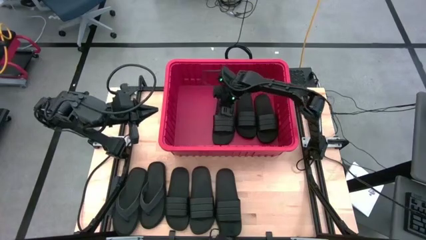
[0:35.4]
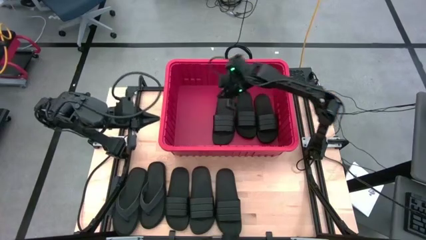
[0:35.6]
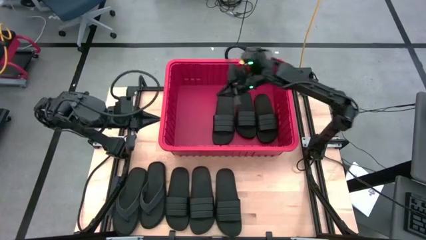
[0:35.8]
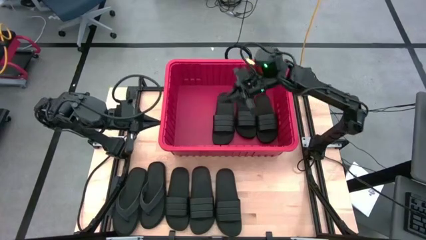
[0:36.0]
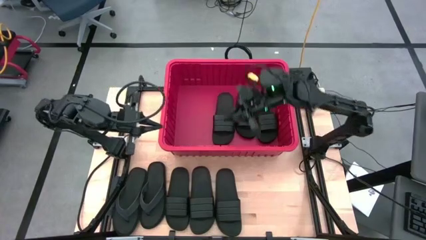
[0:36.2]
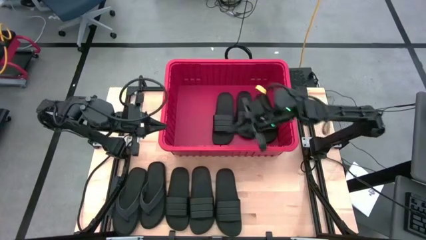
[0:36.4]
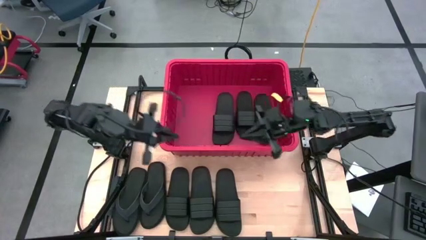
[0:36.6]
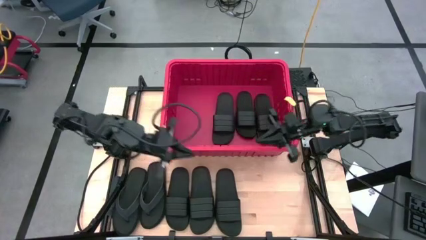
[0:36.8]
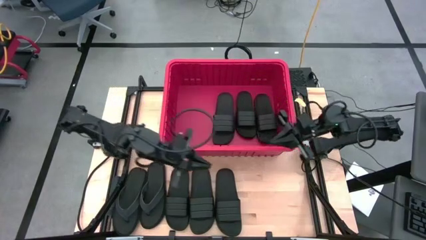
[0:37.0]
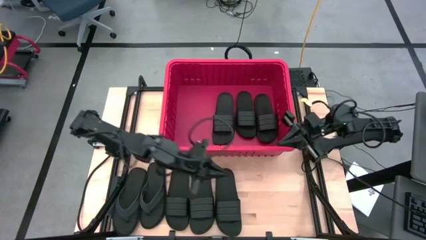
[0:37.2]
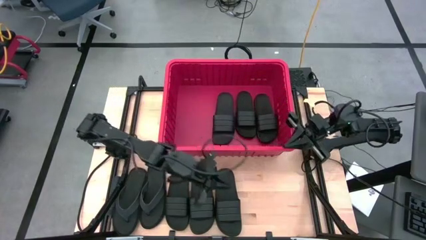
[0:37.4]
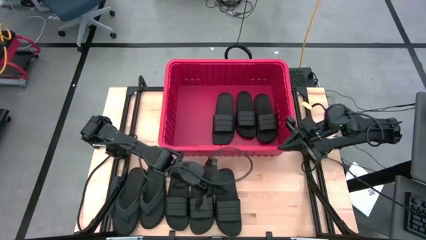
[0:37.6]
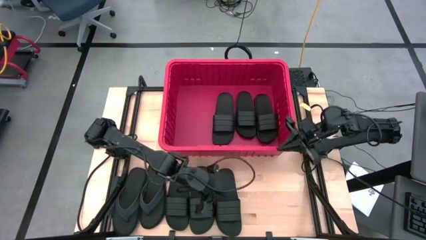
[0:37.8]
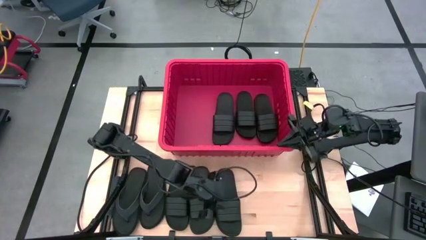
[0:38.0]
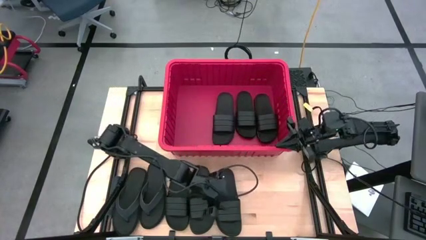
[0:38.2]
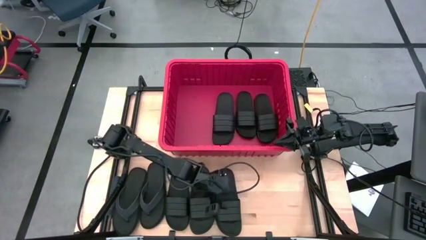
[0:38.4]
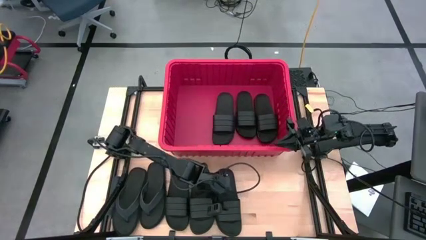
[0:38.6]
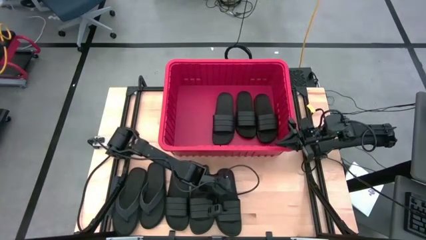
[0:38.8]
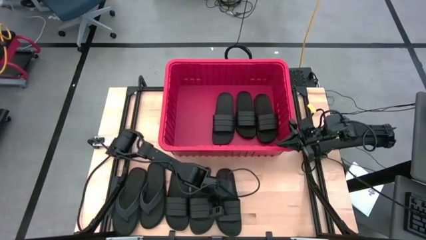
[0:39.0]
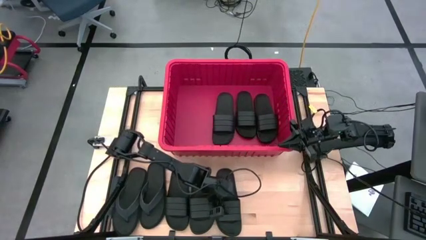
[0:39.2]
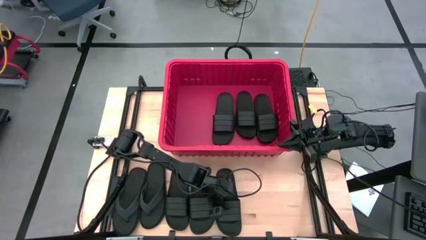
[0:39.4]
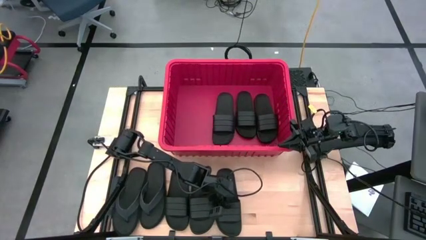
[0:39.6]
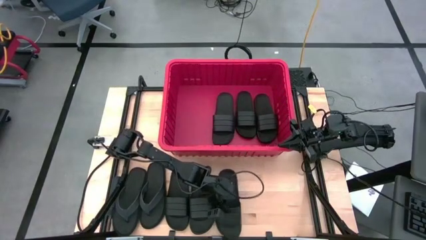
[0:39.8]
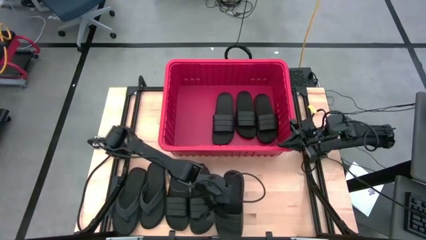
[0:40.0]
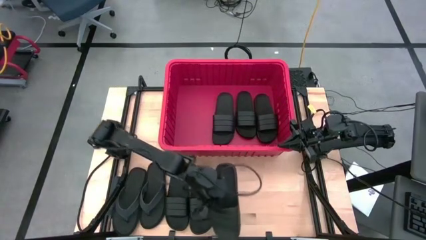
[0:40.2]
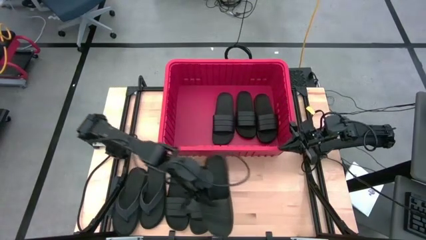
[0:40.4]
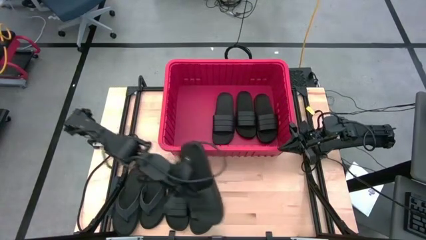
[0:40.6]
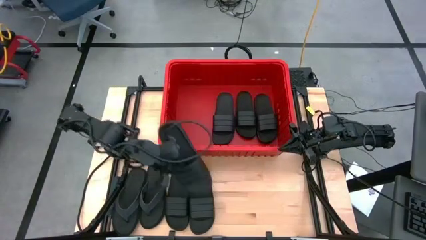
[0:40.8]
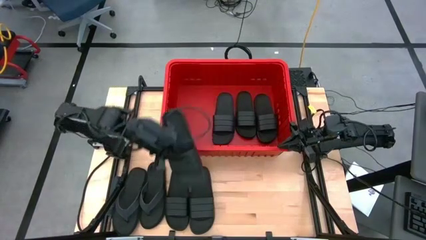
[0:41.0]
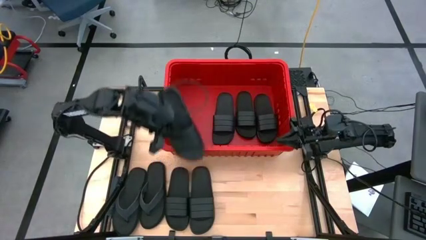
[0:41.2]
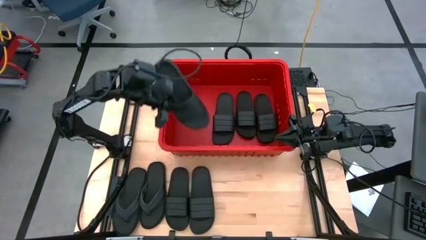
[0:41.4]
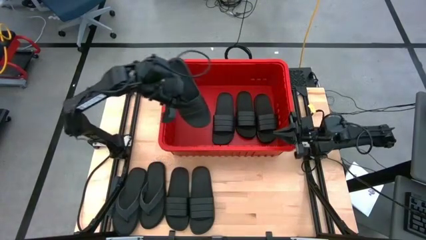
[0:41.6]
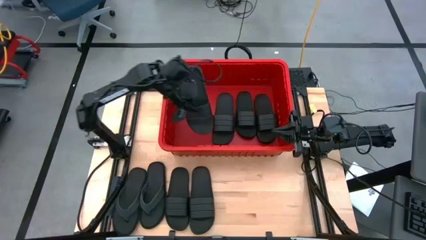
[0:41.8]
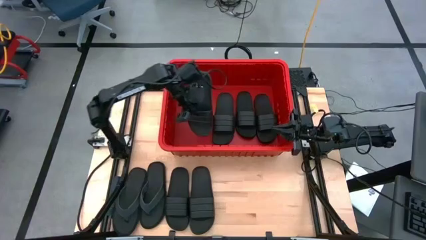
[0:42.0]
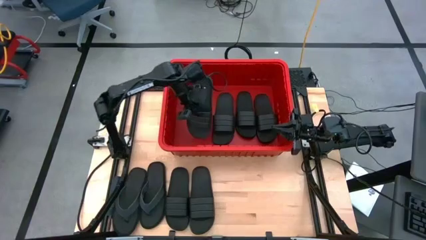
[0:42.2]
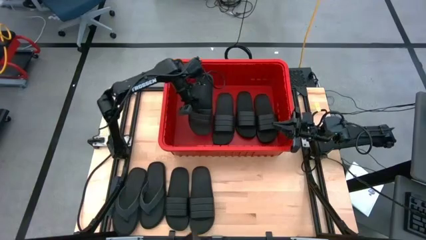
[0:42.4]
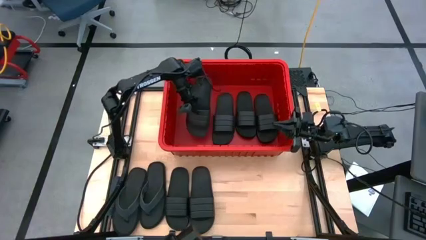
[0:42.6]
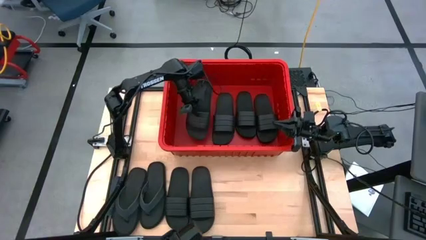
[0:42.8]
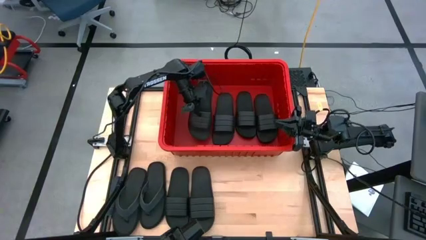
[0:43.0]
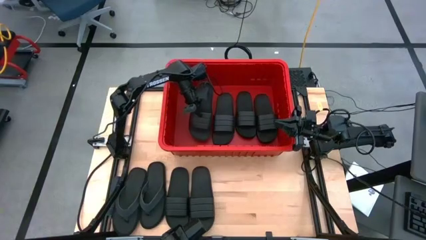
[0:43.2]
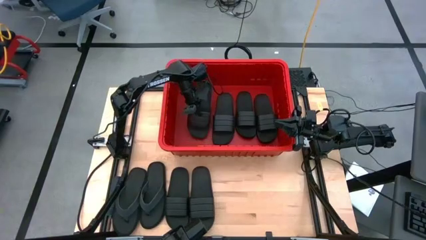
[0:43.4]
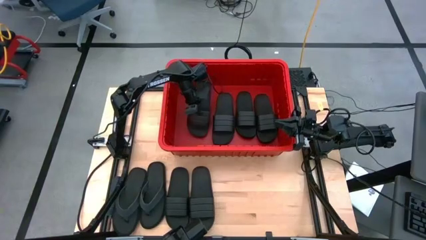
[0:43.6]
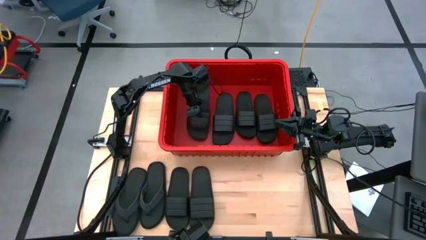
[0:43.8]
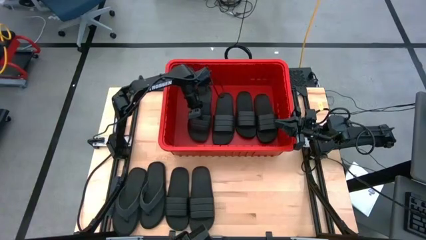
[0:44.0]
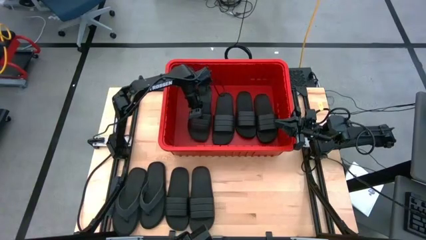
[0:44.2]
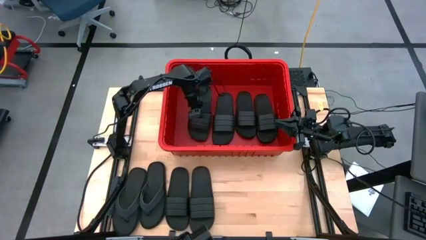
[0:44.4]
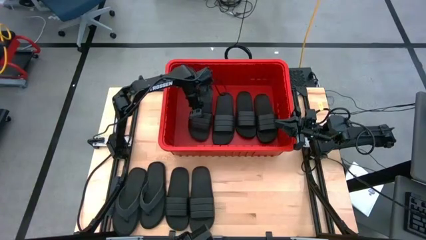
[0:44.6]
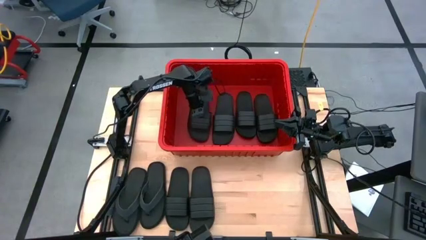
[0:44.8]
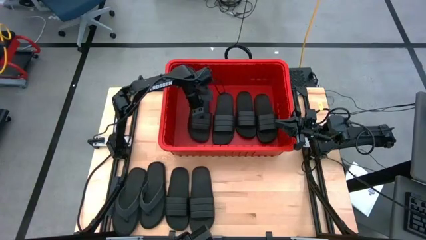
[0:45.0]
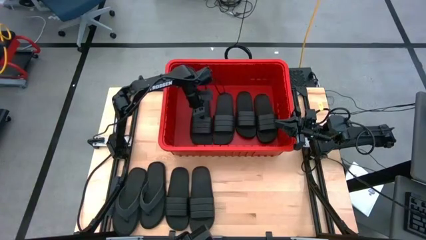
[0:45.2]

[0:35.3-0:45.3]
Task: Pick and place slides into bin
Put the black slide into the red container

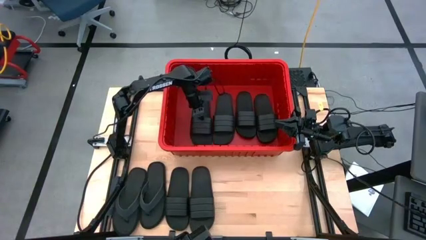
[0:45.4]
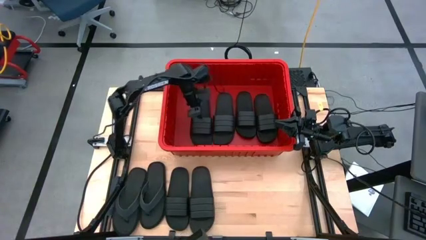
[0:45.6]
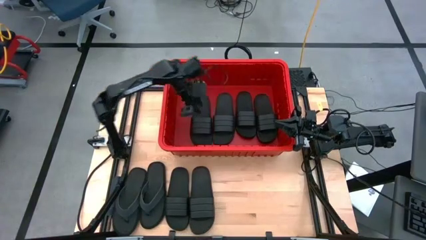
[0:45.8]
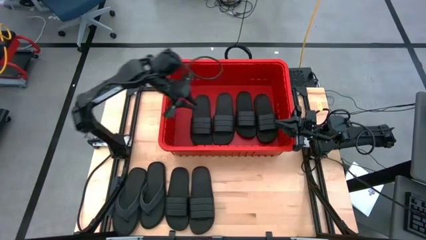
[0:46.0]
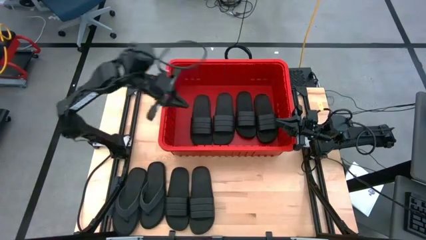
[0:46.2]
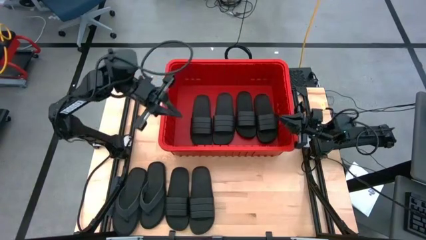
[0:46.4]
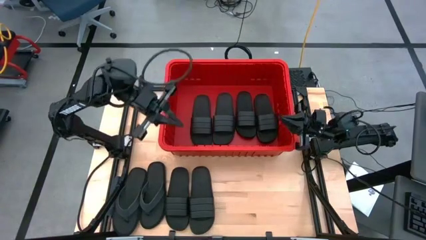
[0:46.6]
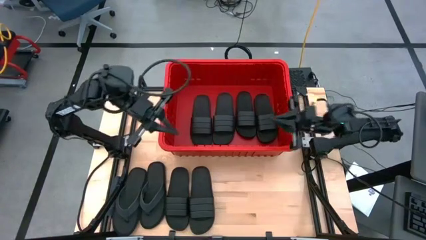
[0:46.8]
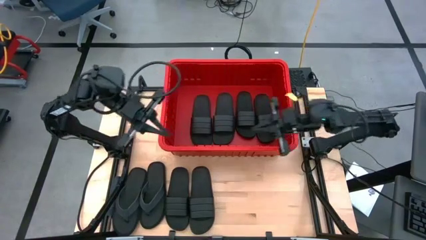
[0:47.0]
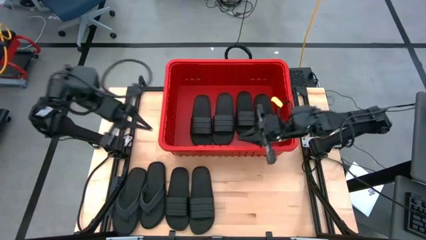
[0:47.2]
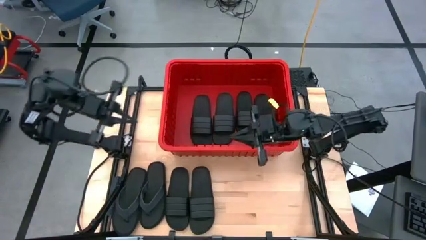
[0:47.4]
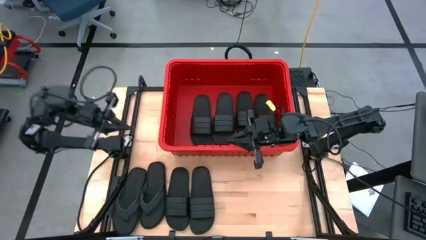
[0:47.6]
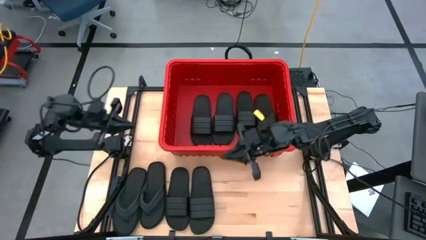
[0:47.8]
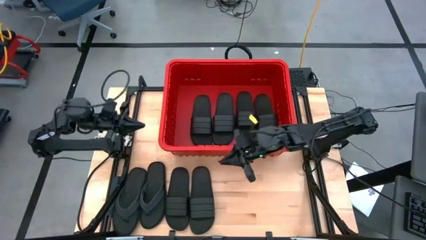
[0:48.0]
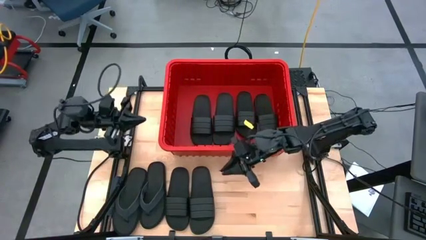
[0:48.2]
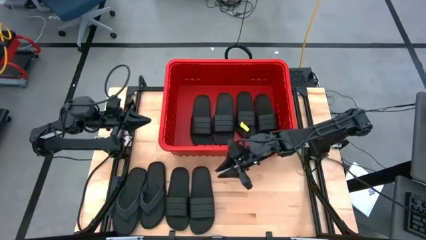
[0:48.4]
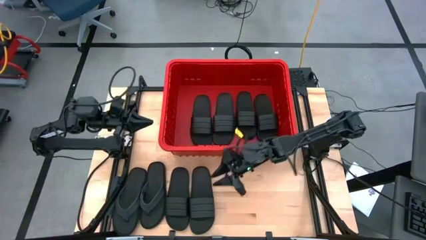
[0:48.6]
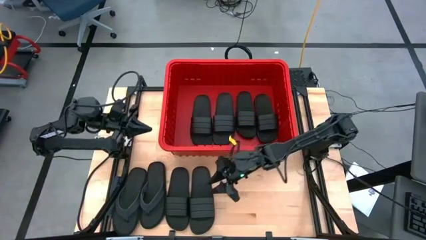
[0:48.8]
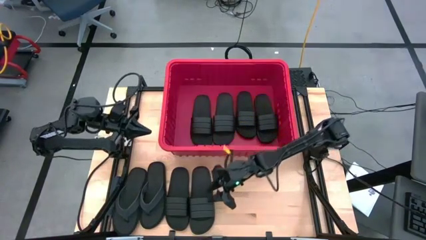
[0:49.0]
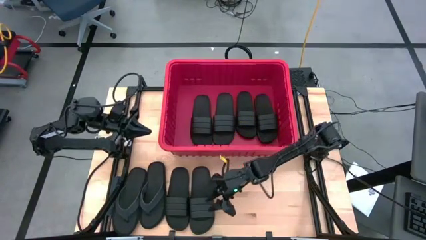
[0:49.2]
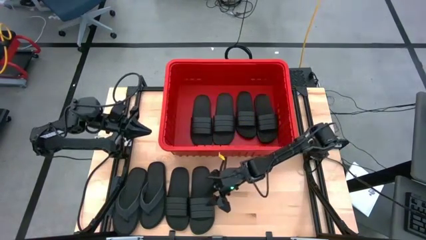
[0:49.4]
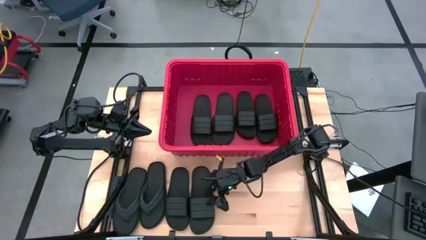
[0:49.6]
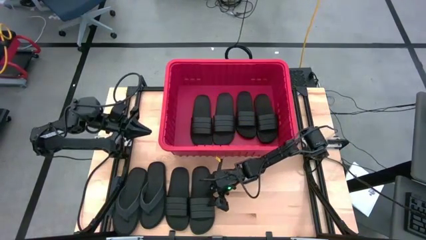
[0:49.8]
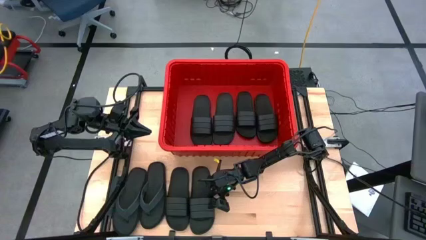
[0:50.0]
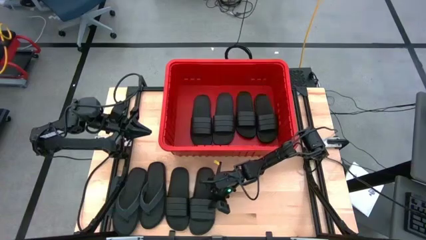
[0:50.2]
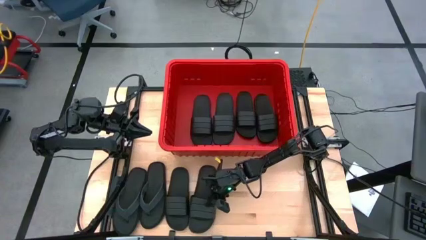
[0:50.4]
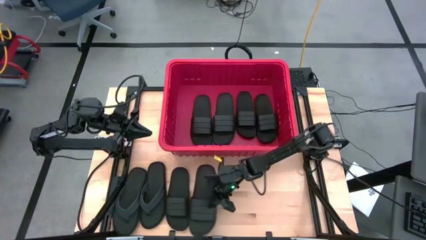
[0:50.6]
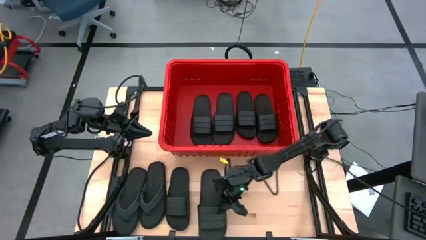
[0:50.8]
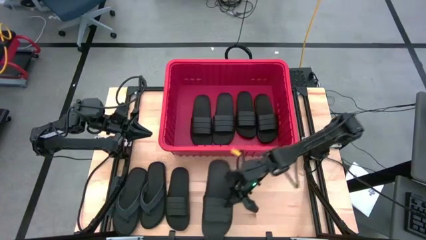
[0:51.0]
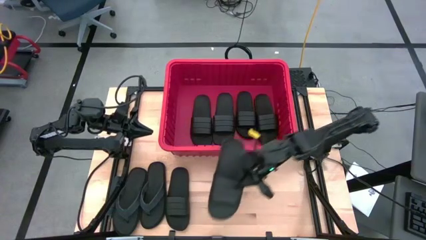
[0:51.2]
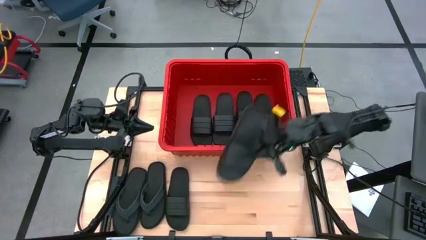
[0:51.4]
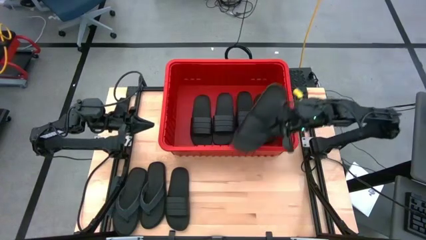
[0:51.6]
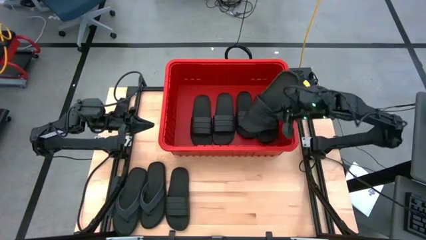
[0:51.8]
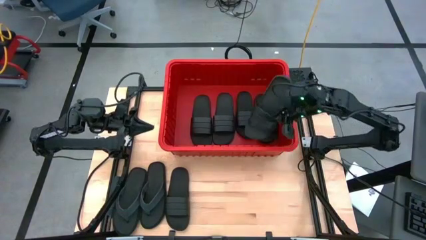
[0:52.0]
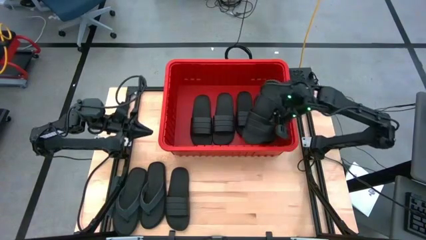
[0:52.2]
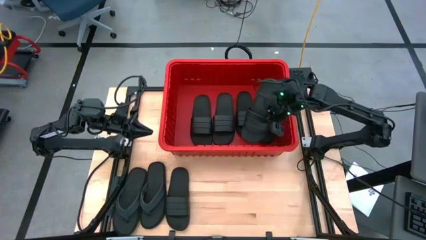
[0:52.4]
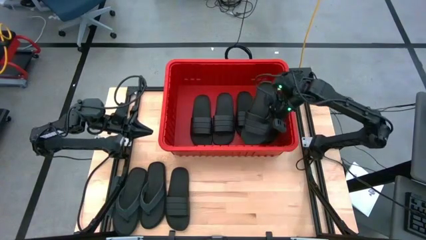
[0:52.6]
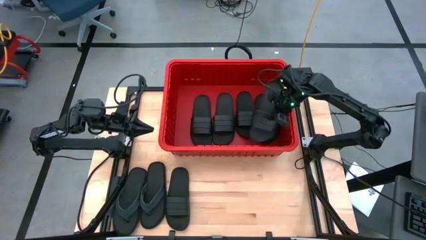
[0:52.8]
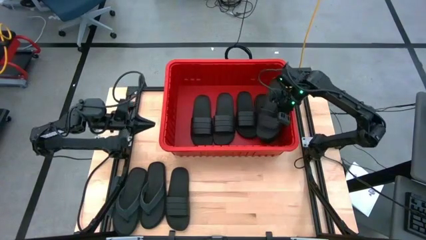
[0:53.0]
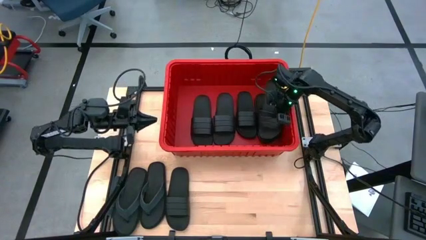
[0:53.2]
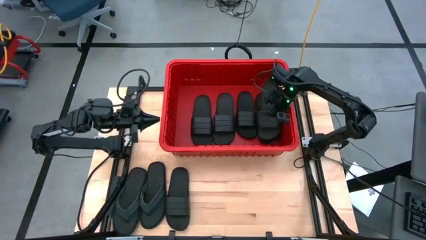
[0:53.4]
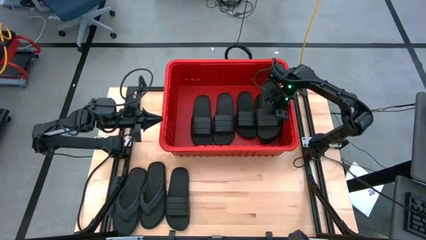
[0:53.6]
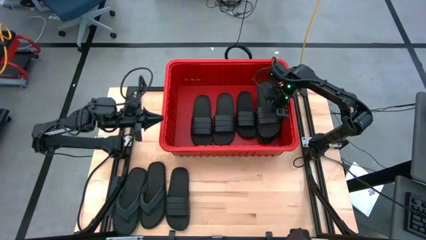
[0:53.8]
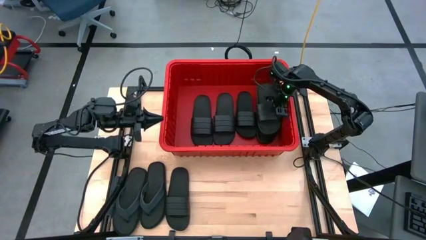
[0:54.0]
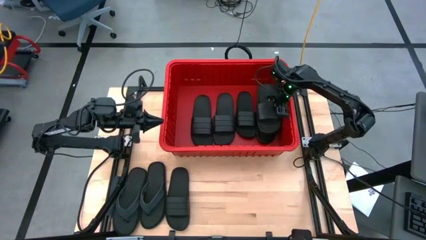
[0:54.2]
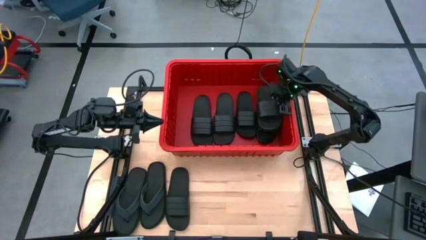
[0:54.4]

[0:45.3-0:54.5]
Put the black slide into the red container
